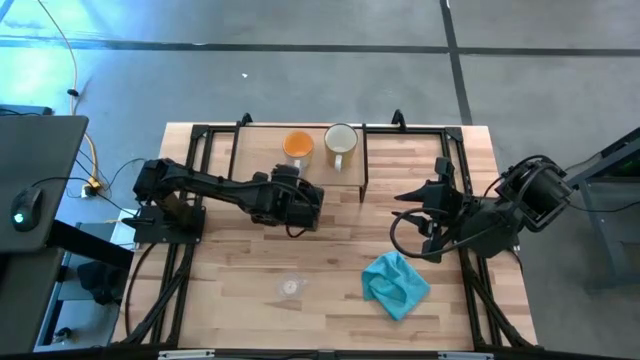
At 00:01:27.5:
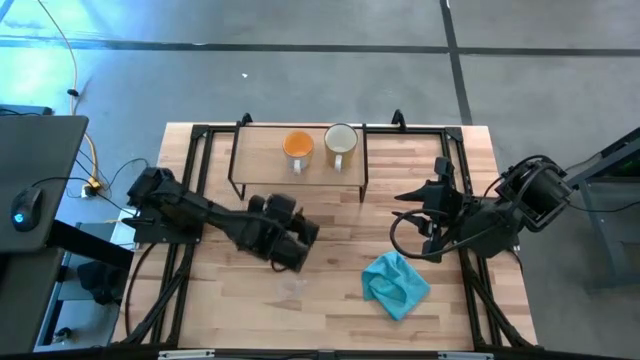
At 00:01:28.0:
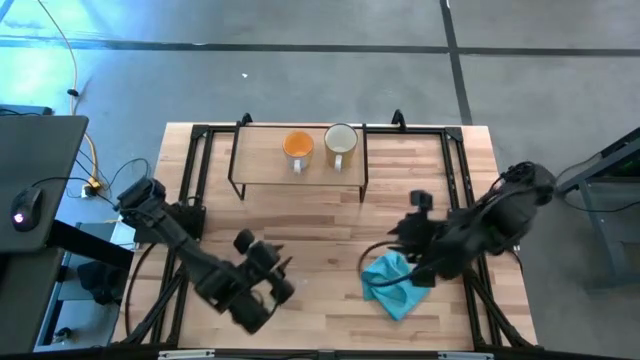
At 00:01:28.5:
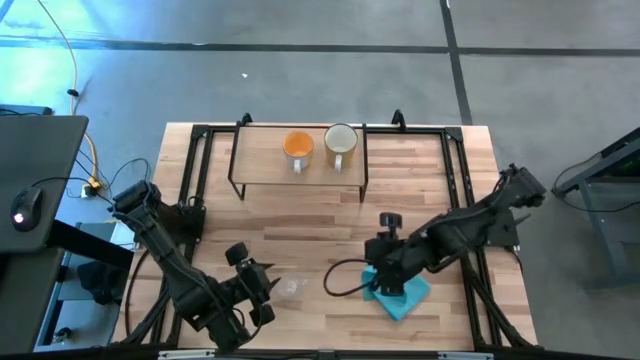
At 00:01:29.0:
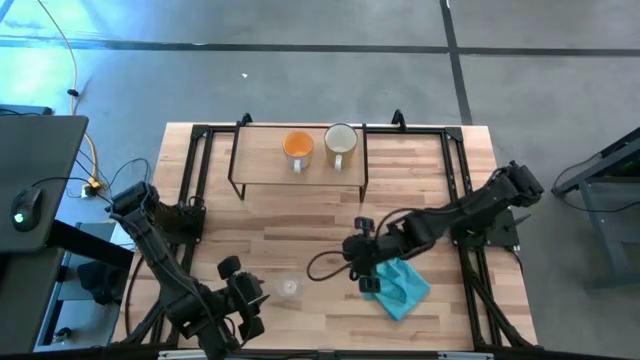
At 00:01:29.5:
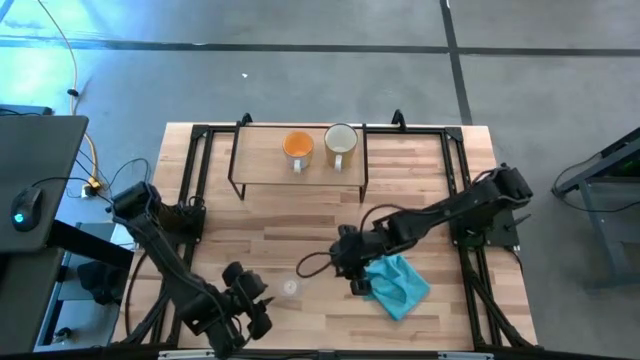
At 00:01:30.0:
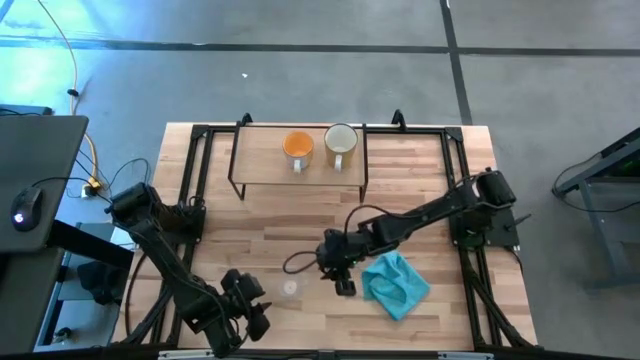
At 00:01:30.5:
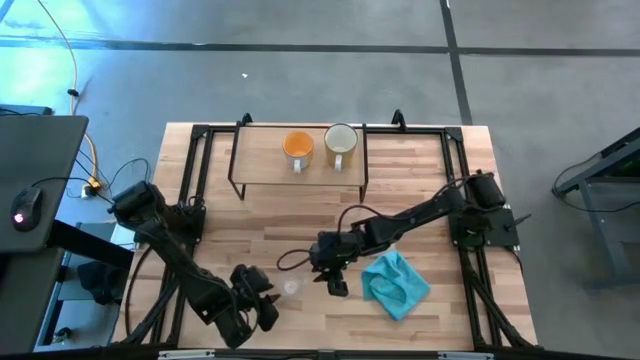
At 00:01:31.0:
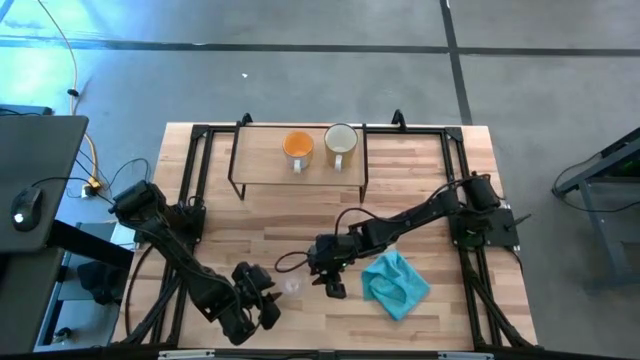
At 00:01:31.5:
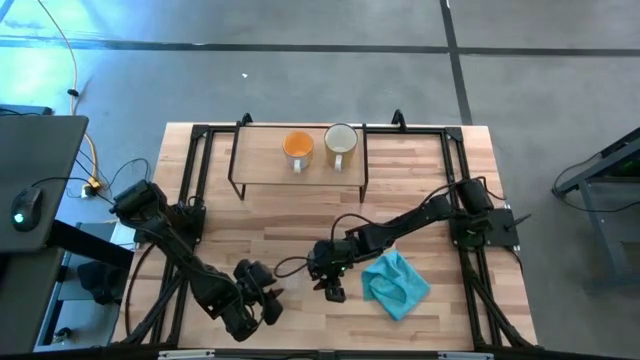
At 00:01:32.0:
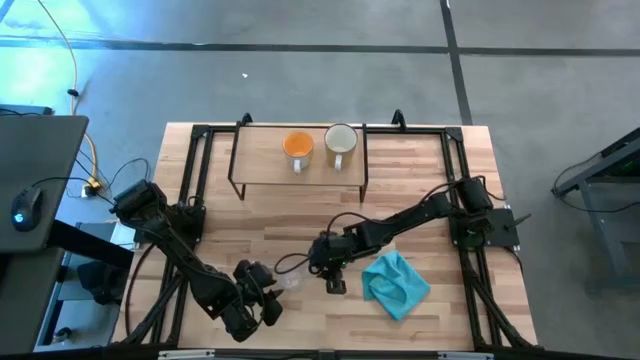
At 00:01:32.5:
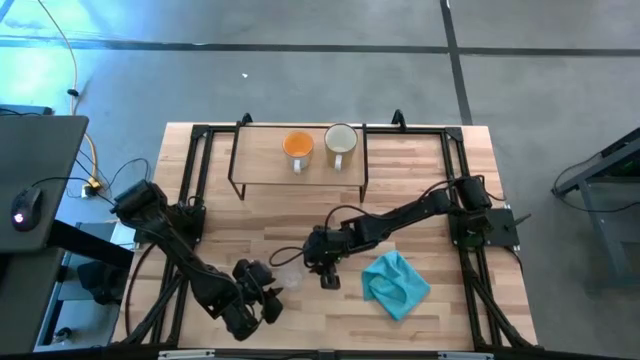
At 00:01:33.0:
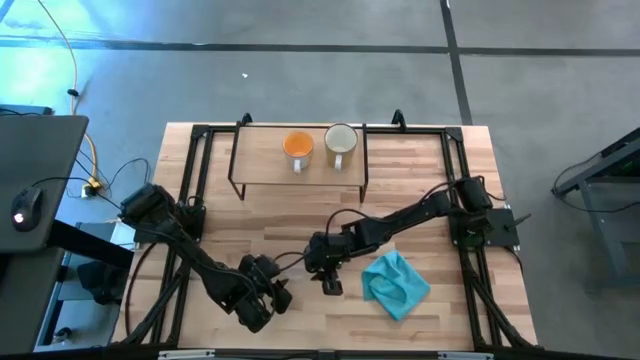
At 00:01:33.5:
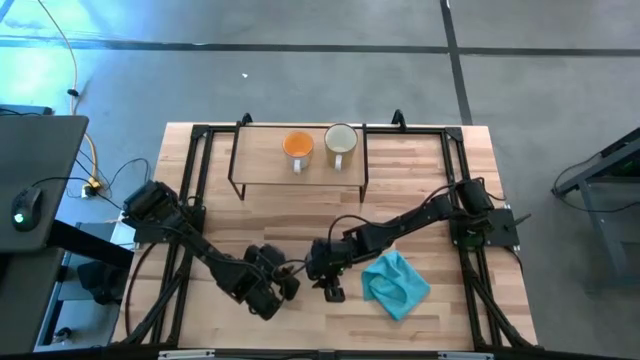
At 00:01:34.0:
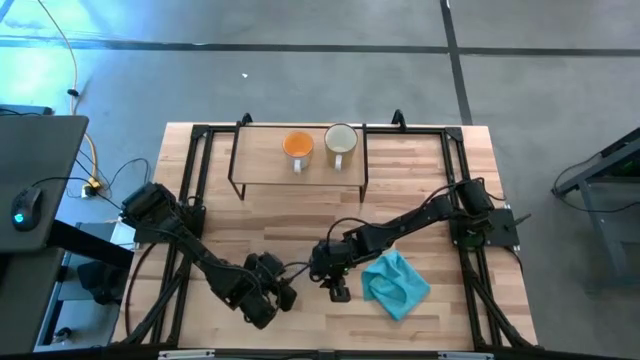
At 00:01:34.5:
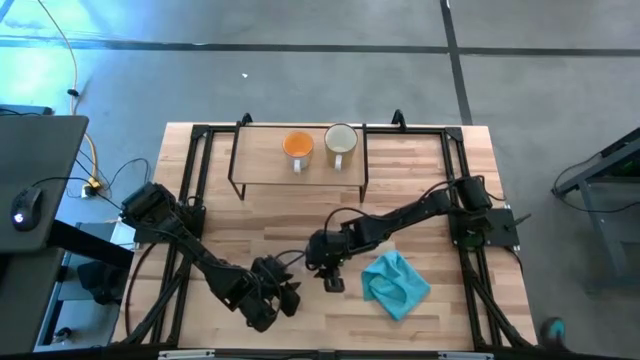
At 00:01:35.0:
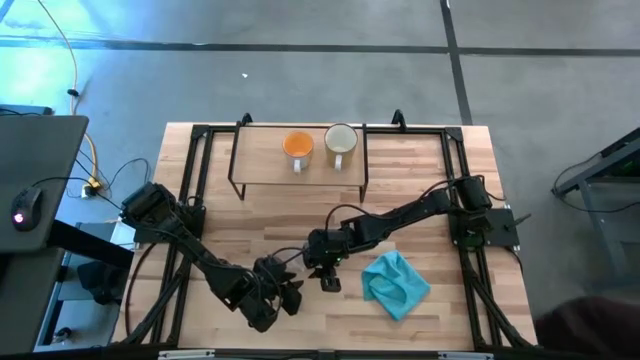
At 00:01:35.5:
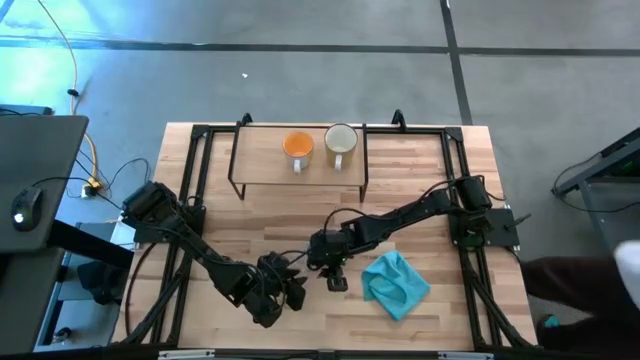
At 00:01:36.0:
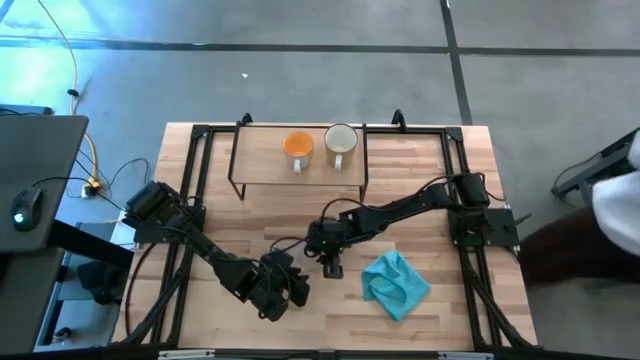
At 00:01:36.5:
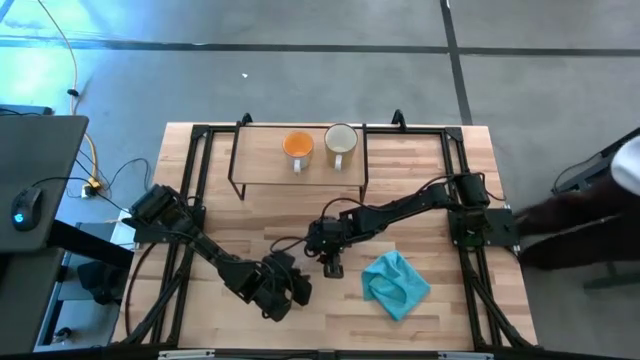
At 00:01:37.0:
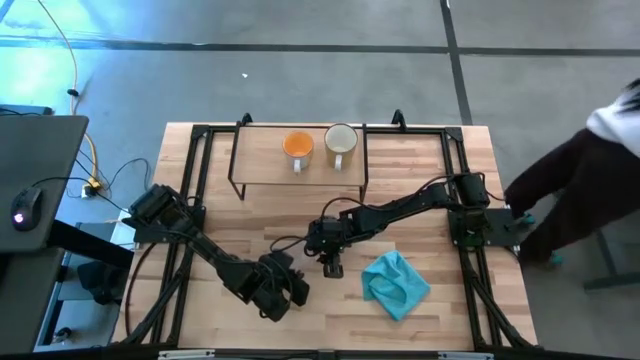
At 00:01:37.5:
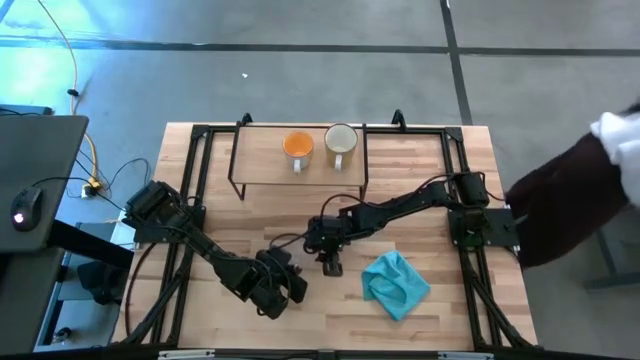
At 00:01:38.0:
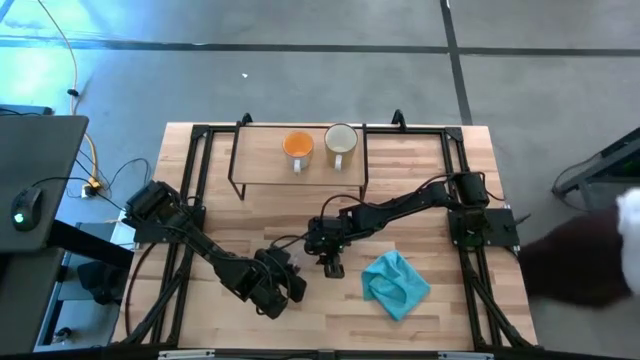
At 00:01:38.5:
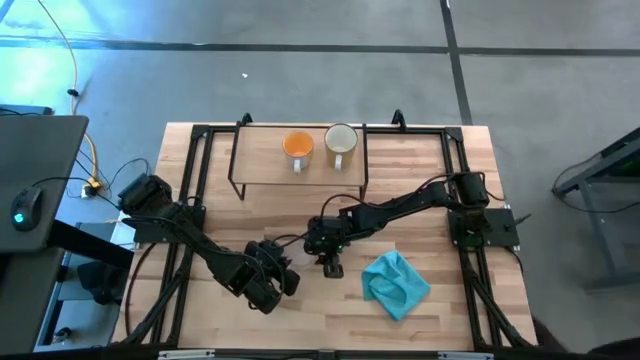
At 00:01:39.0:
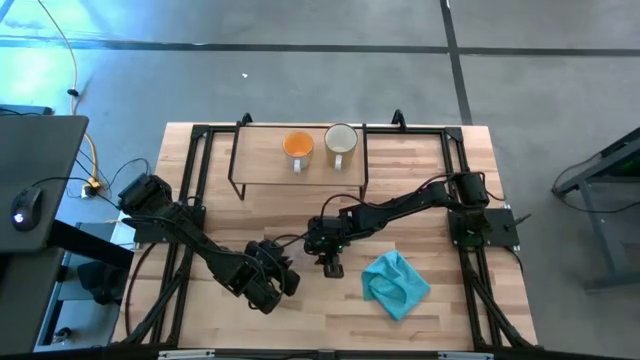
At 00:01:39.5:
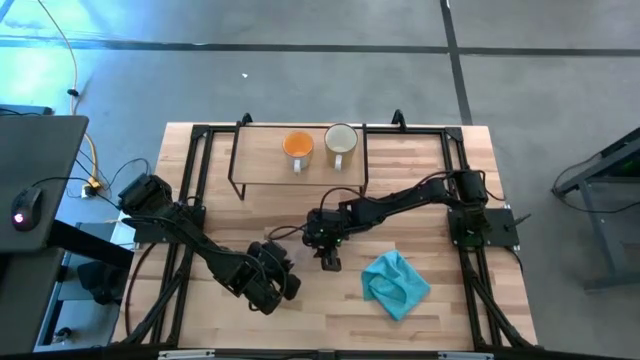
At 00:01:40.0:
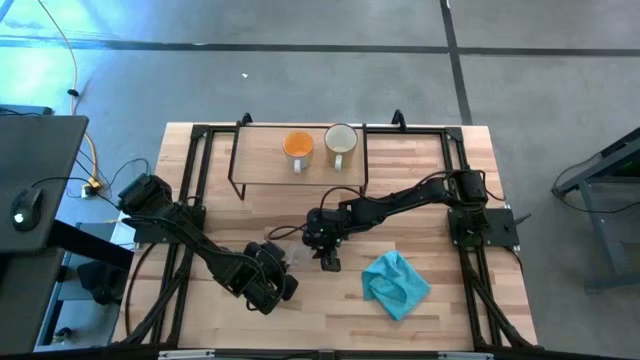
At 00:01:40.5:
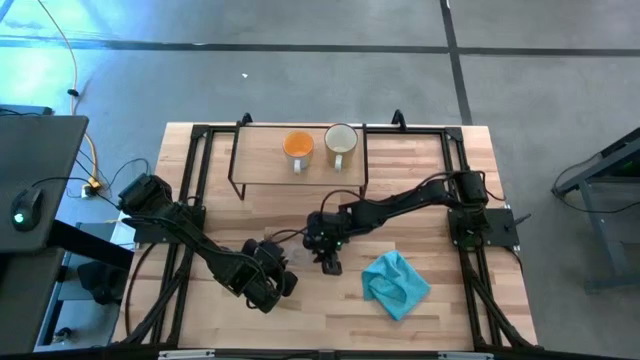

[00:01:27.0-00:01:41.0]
Task: Stack small to large cups/mugs on shelf
Put the transparent mug on the shelf

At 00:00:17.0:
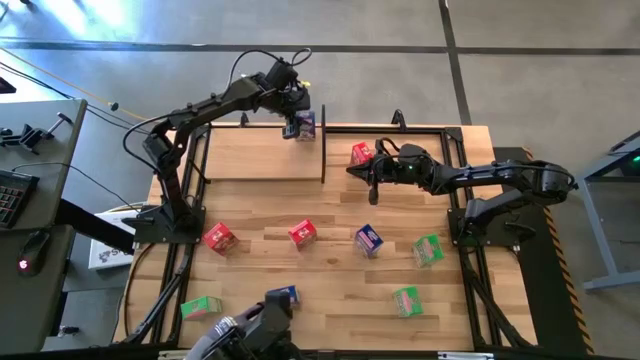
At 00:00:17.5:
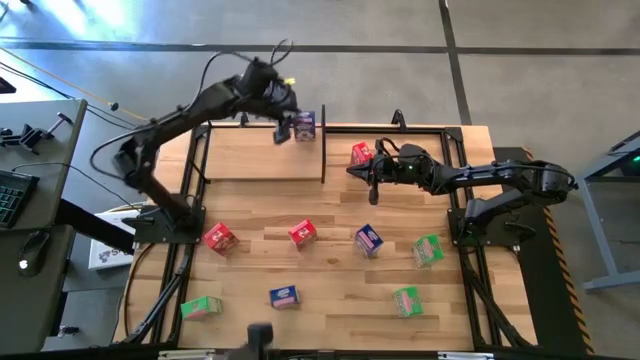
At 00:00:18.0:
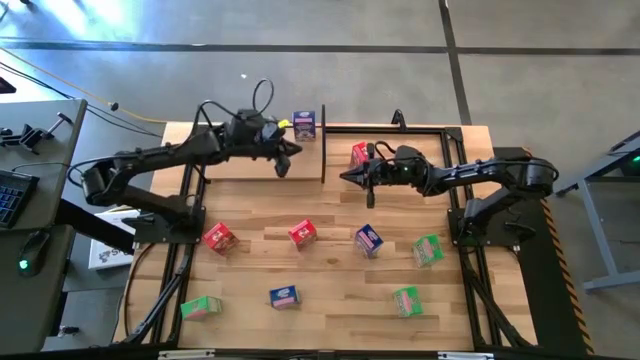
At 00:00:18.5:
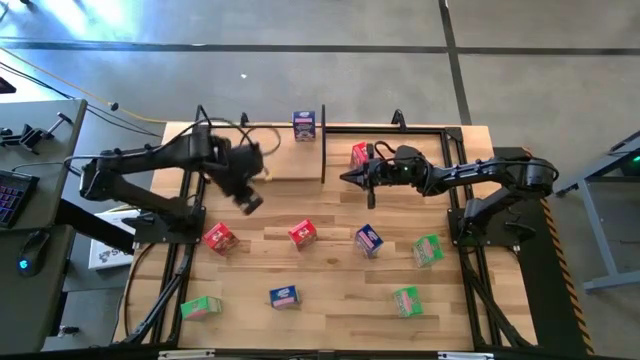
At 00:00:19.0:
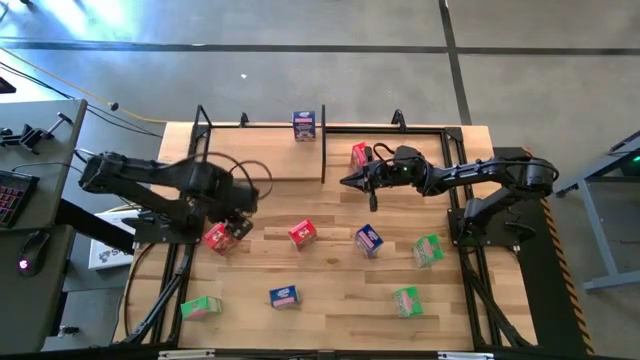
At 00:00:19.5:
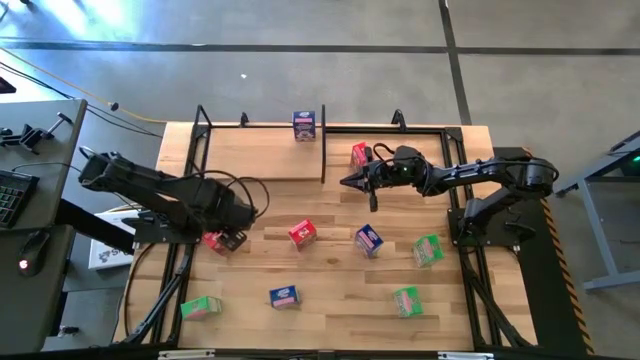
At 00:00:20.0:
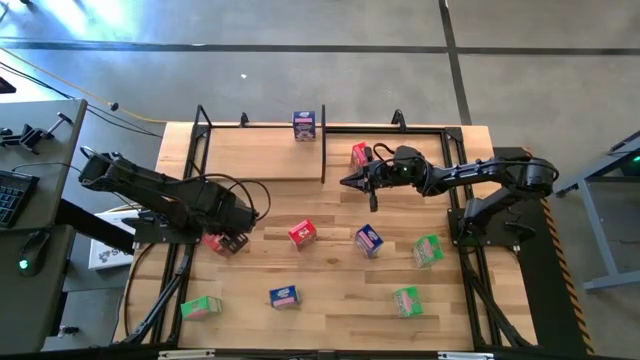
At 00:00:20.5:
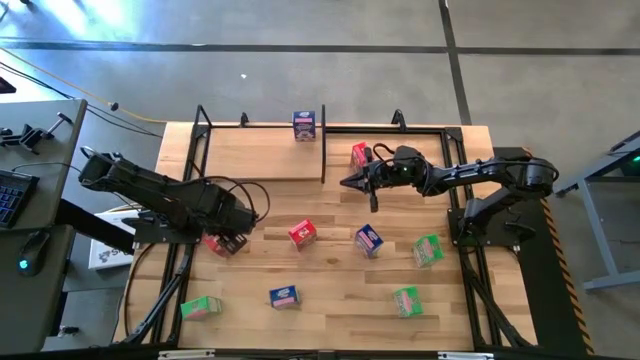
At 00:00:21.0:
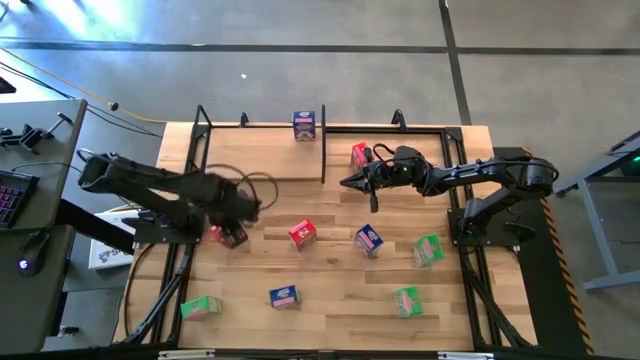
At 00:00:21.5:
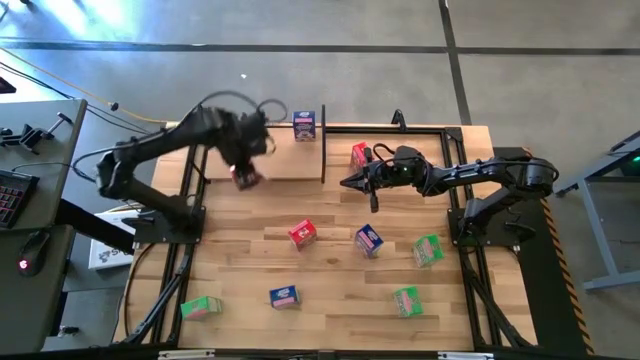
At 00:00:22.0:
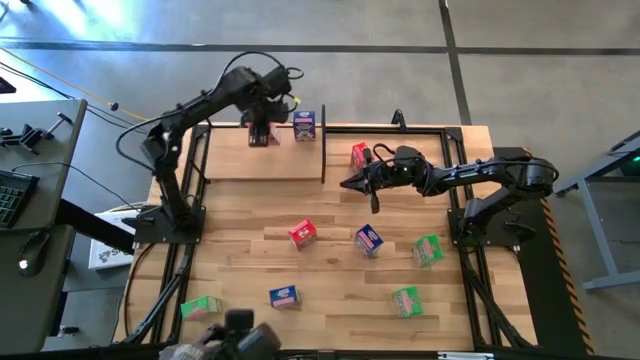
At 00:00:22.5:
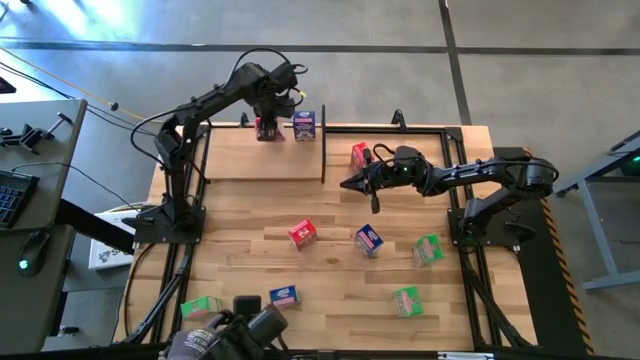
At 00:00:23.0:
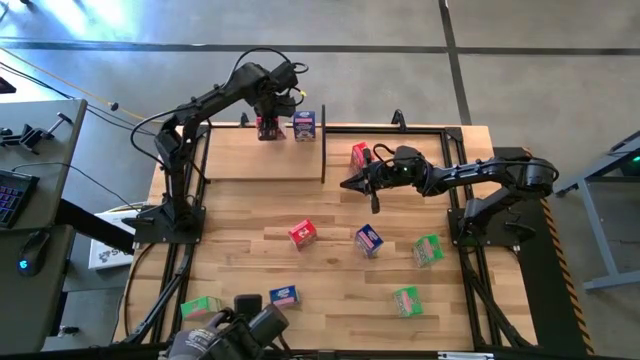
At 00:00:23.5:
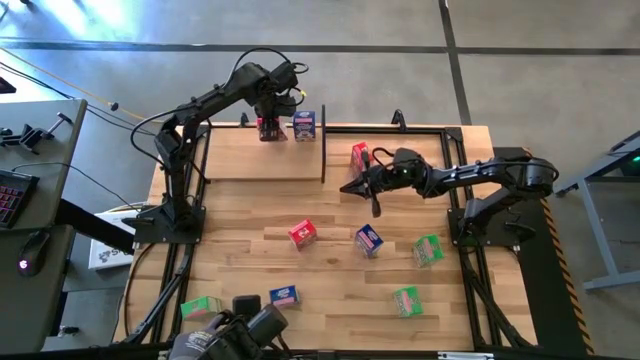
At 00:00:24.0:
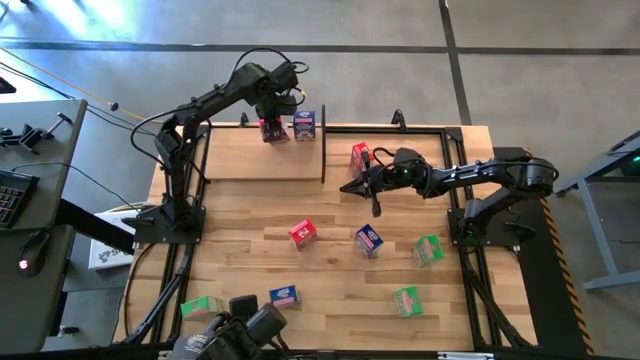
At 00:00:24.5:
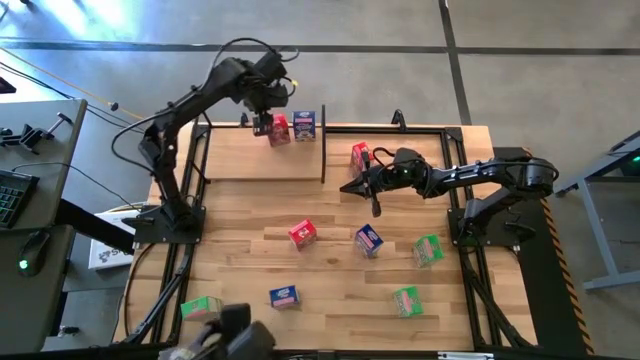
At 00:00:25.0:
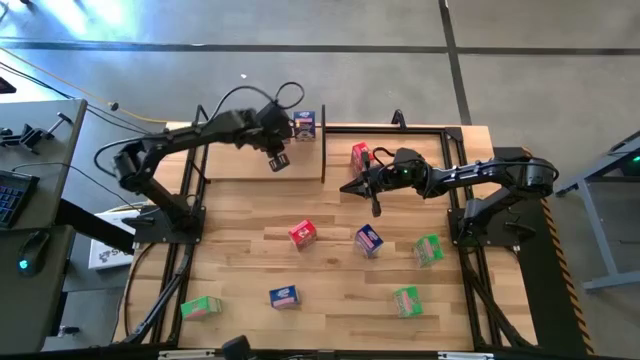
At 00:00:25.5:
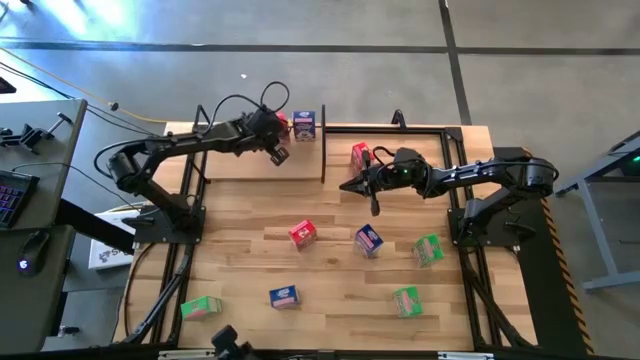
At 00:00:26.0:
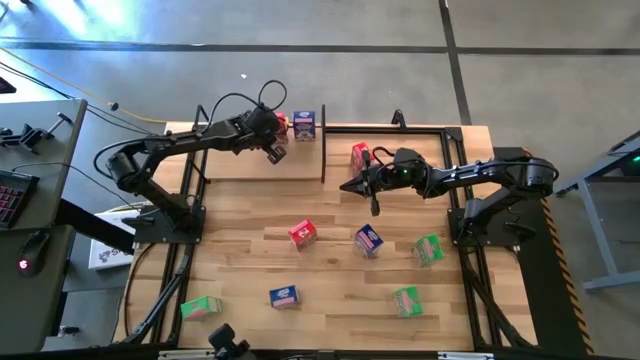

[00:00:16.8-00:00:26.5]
Task: Stack cereal on shelf
Put the bottom left red cereal box on the shelf
